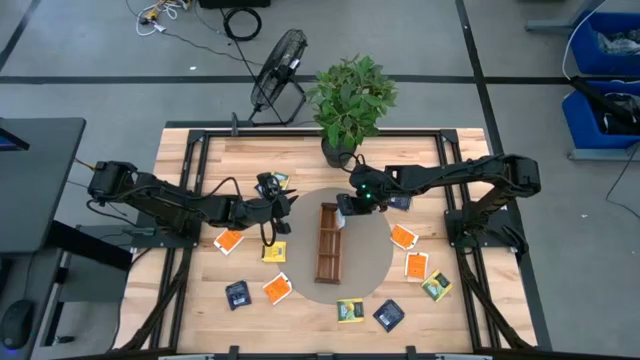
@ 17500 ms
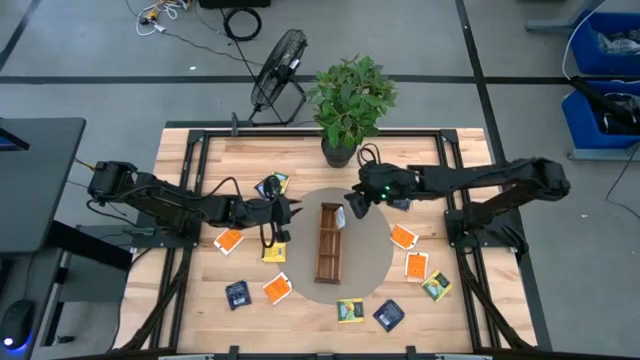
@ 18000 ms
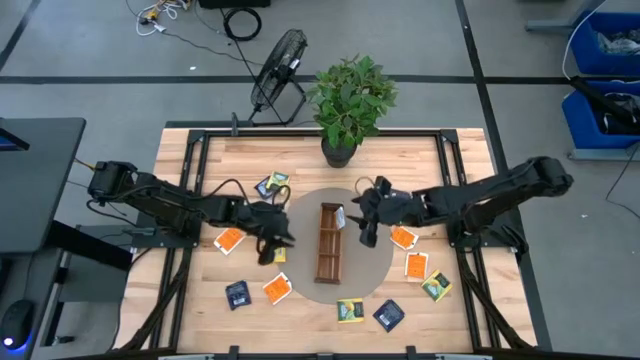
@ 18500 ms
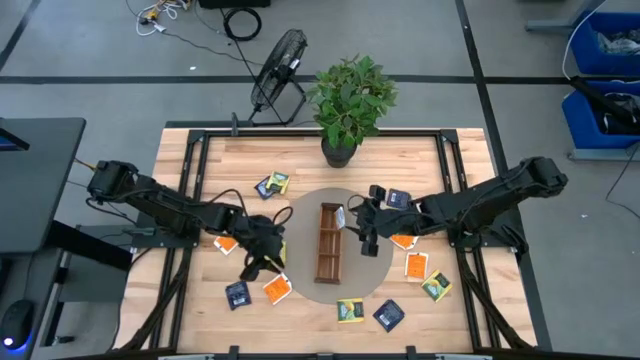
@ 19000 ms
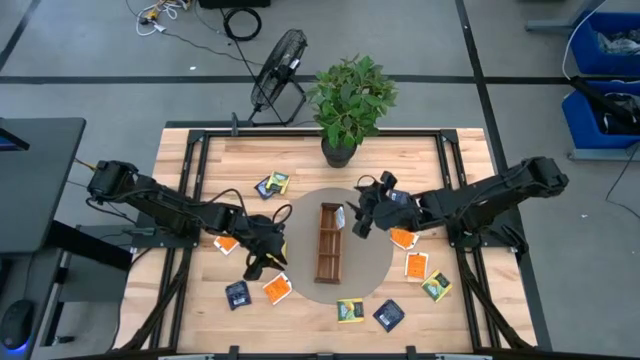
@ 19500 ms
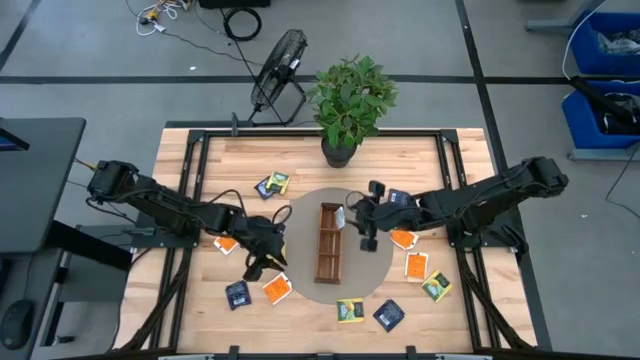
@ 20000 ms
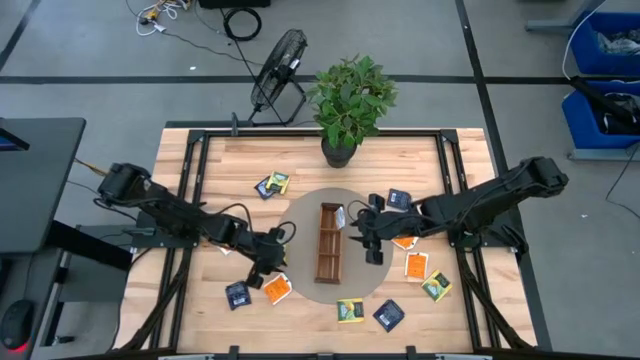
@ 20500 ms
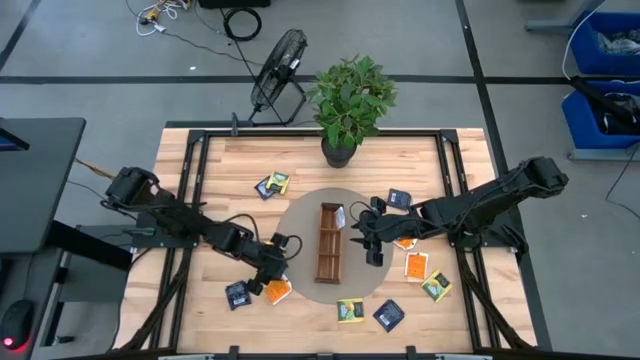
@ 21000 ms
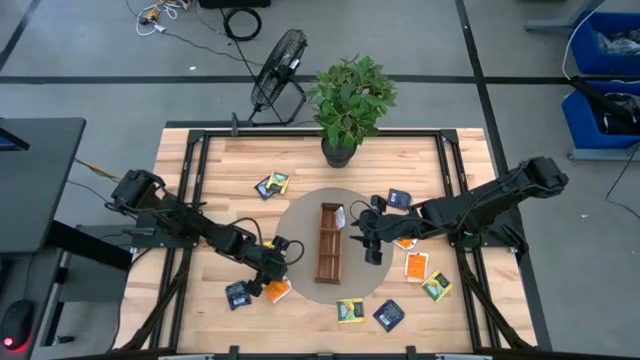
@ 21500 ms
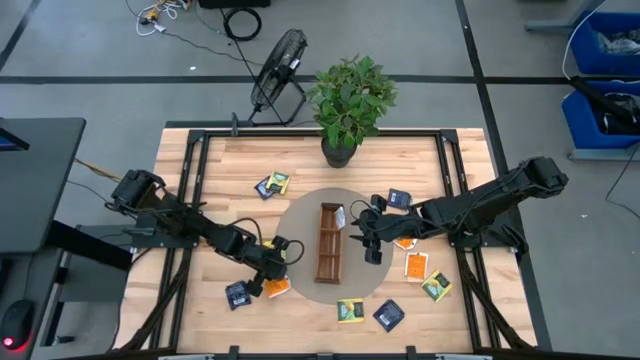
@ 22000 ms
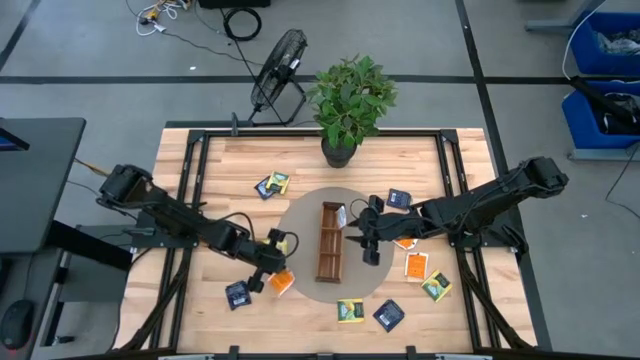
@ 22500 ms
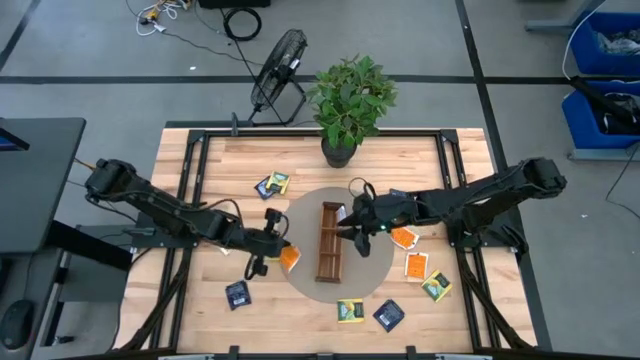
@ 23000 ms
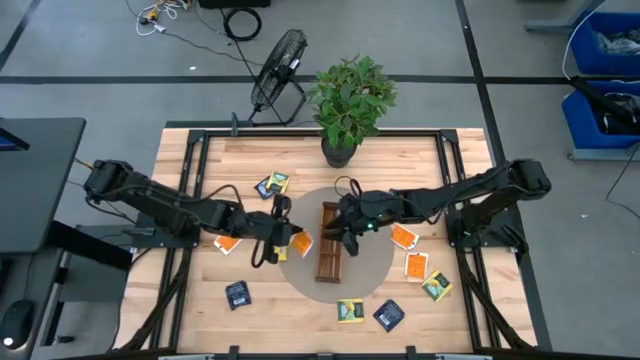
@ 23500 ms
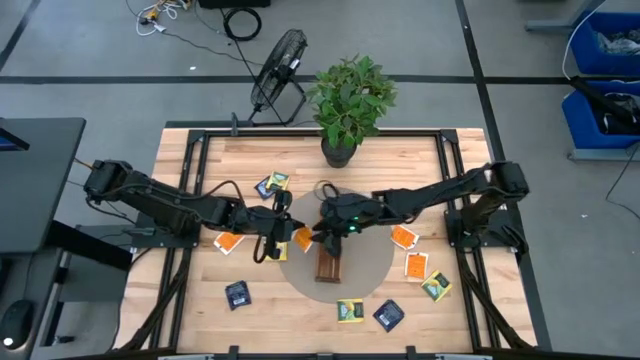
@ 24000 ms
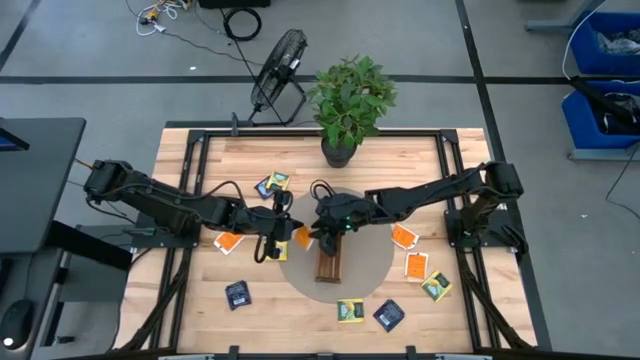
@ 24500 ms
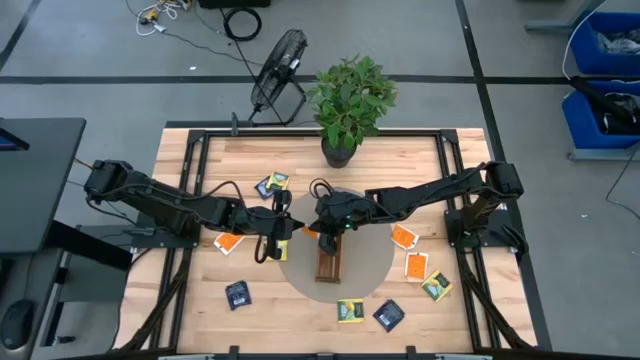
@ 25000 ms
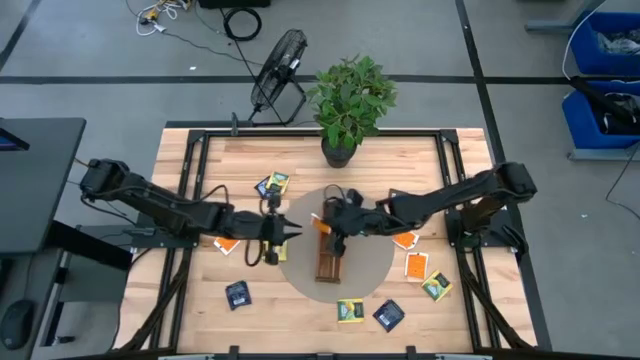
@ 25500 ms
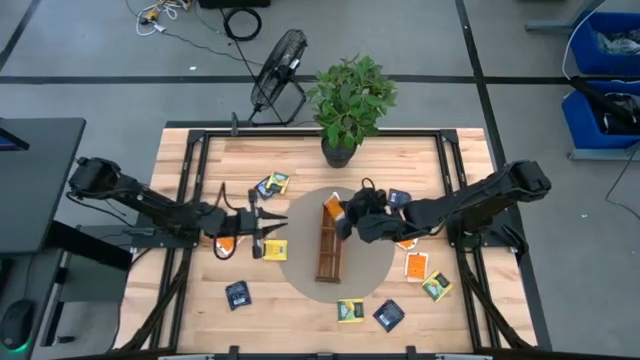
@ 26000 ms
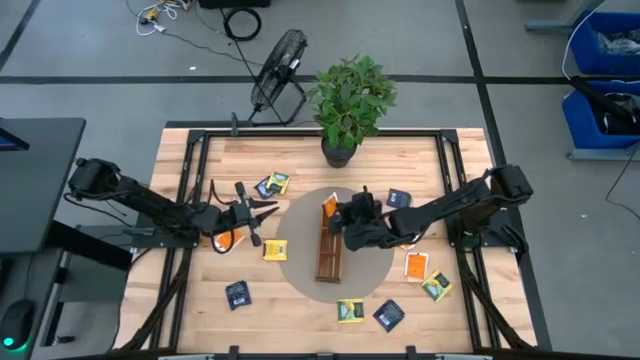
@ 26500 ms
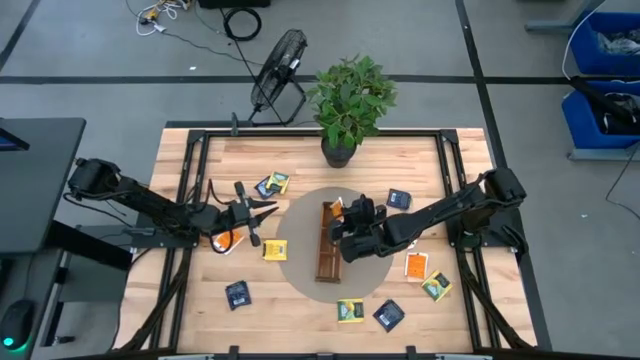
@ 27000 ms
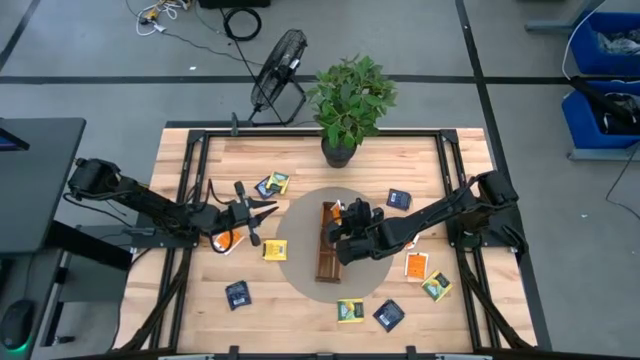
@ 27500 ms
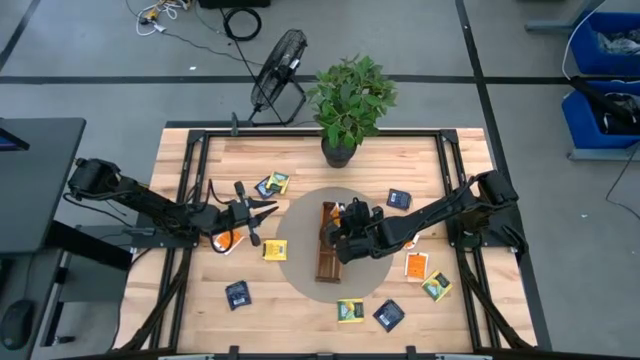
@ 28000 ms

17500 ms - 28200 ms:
Task: Pick & Place Tea
Put the orange tea bag into the top compartment of the top section wooden organizer

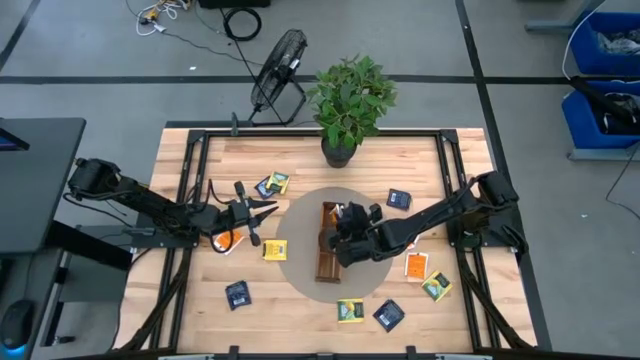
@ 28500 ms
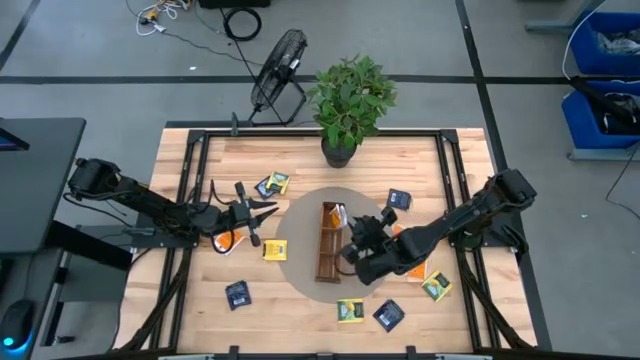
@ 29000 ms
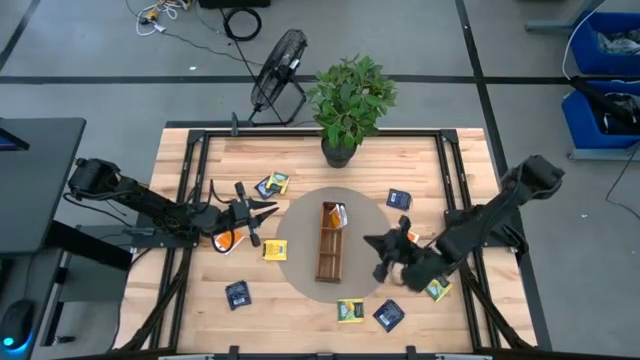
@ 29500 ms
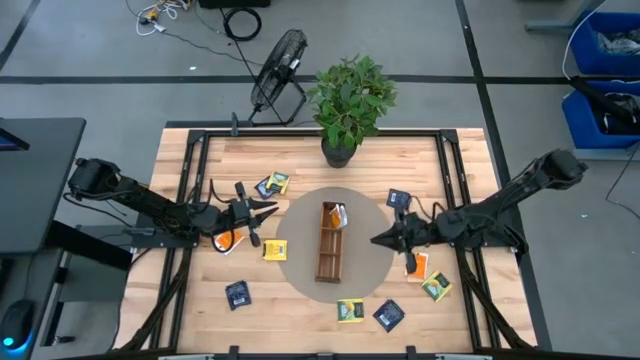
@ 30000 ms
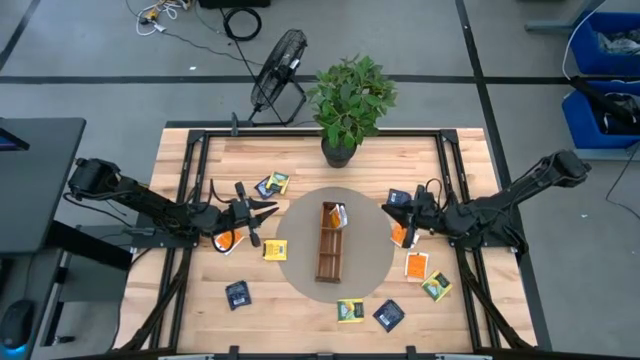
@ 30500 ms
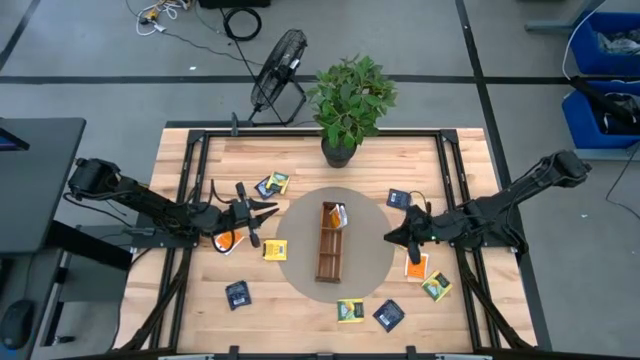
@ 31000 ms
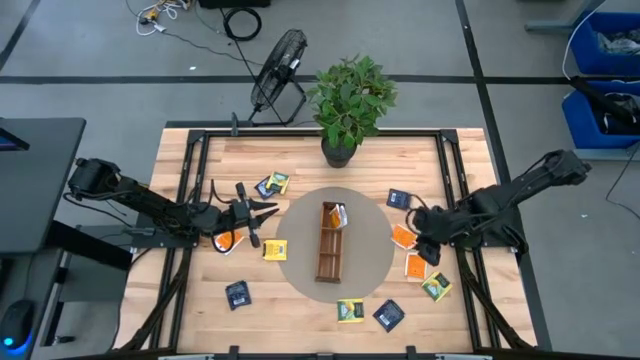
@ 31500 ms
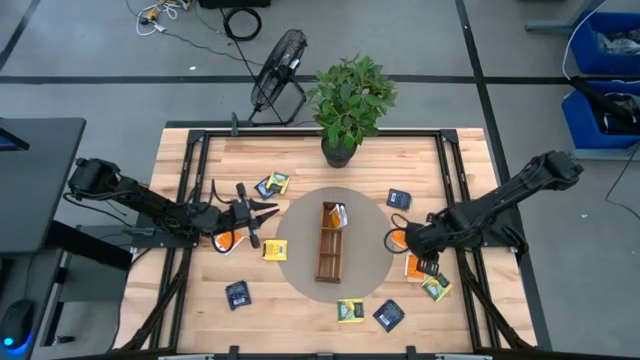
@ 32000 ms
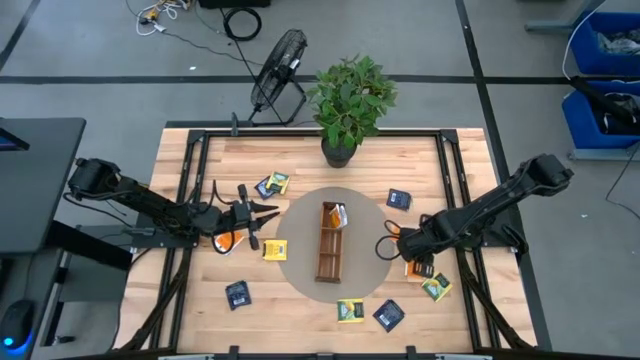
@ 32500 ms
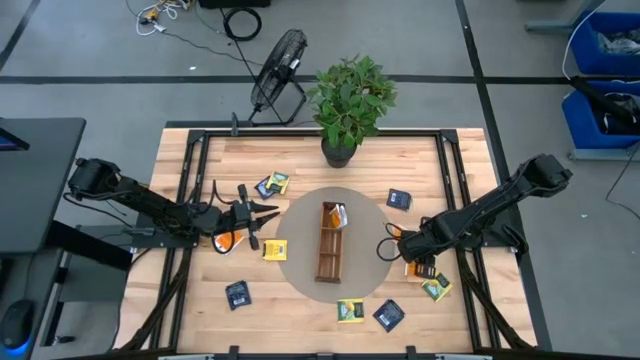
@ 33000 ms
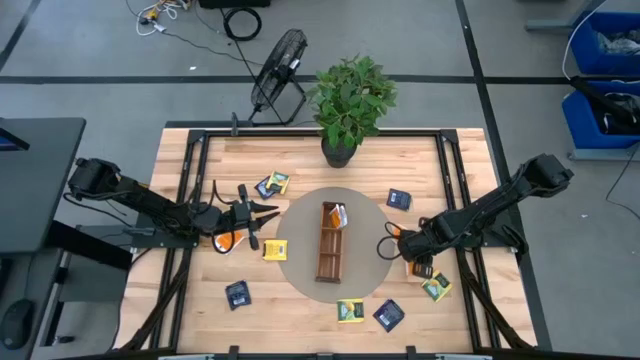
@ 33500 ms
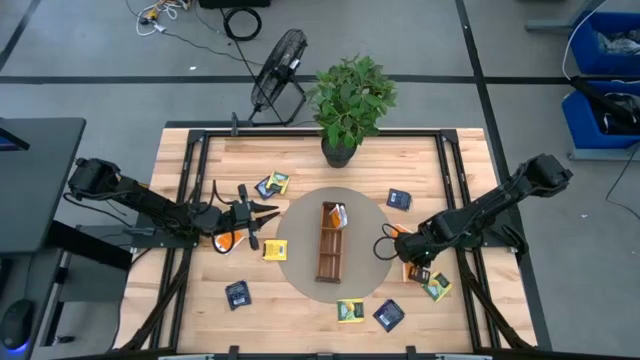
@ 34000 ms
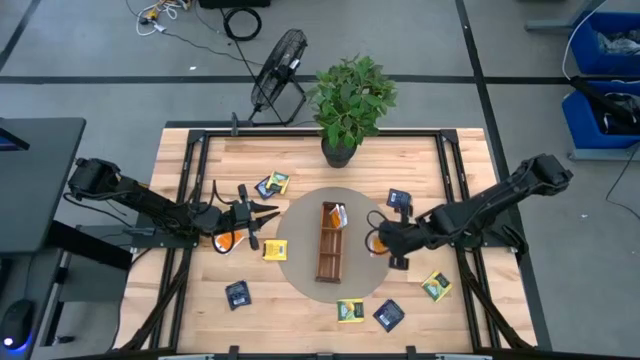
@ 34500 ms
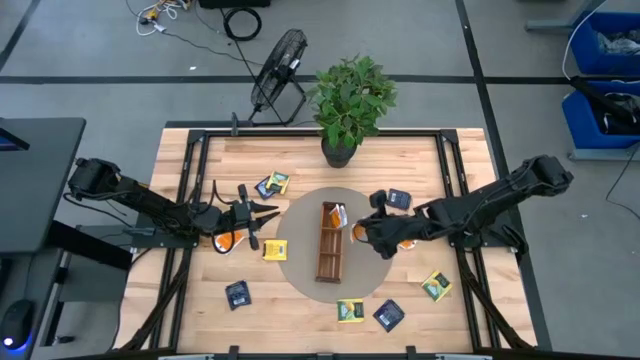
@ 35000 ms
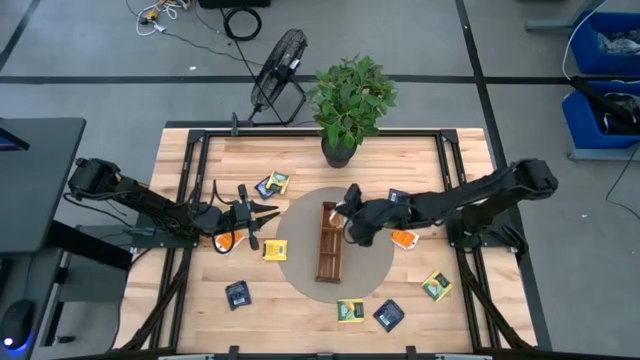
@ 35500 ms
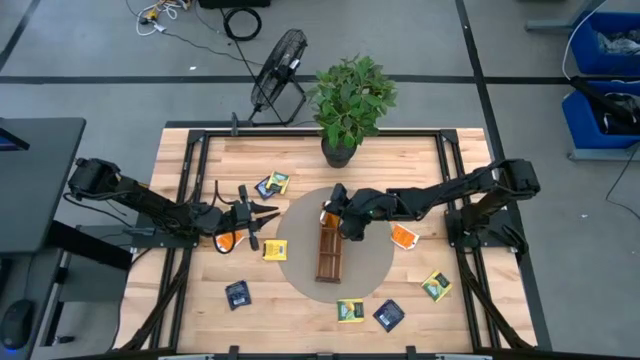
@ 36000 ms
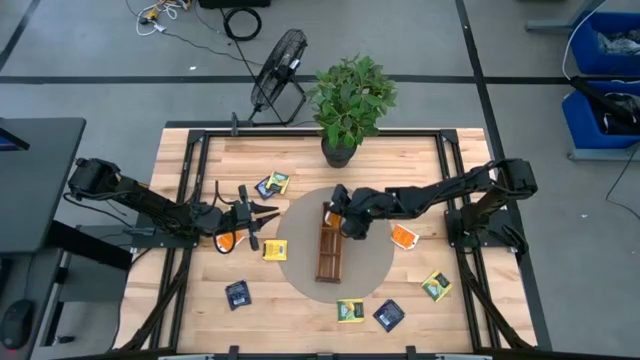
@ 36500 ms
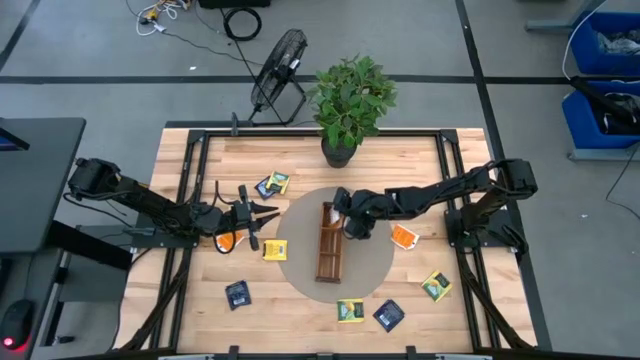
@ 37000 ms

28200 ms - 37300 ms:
Put the orange tea bag into the top compartment of the top section wooden organizer
